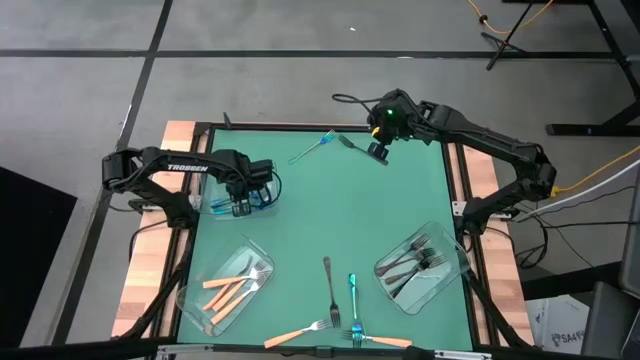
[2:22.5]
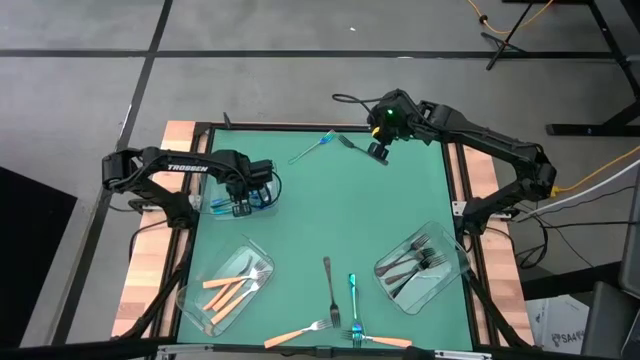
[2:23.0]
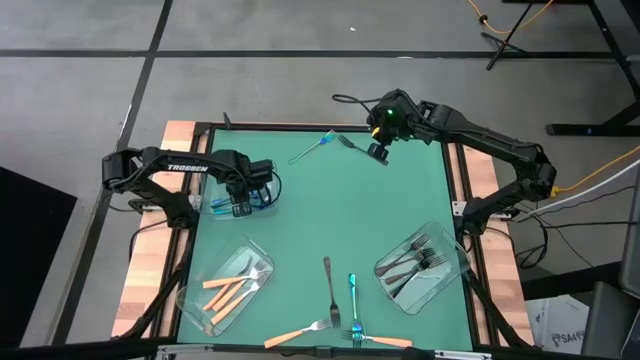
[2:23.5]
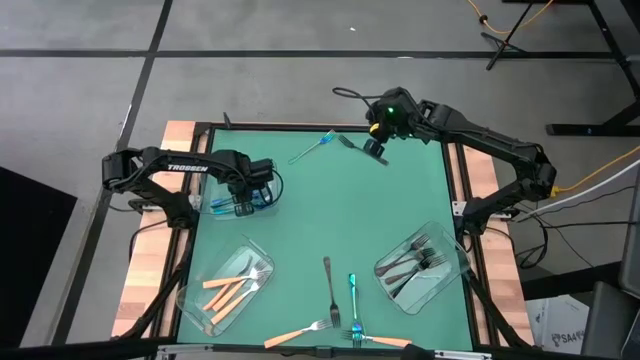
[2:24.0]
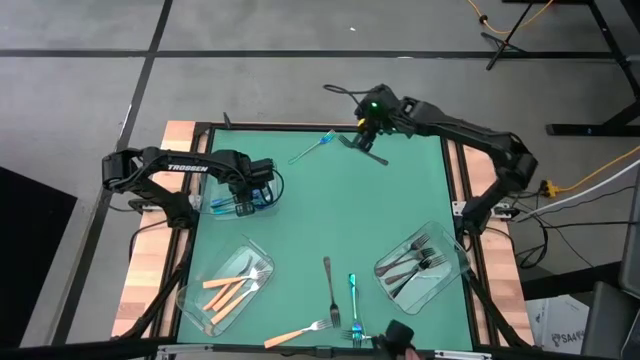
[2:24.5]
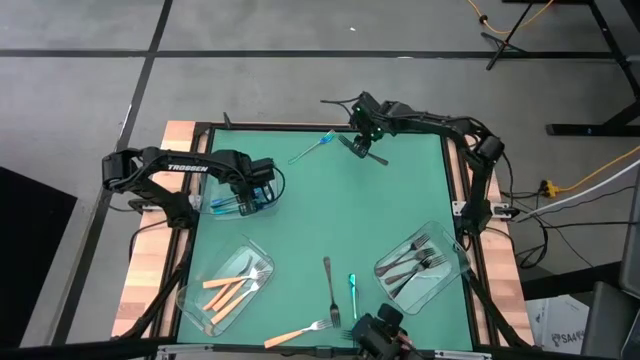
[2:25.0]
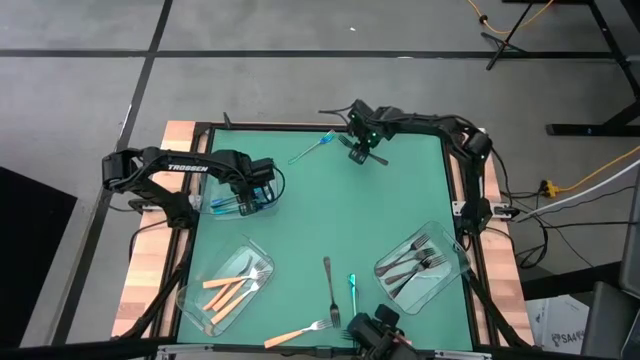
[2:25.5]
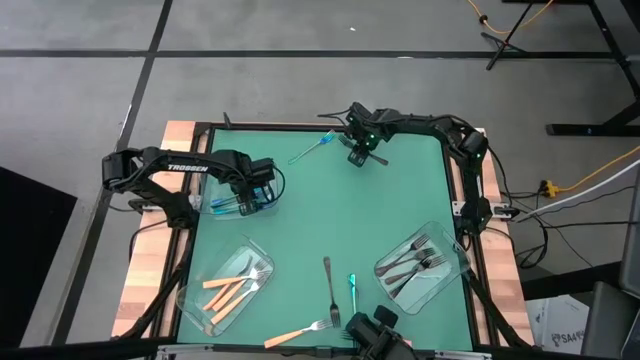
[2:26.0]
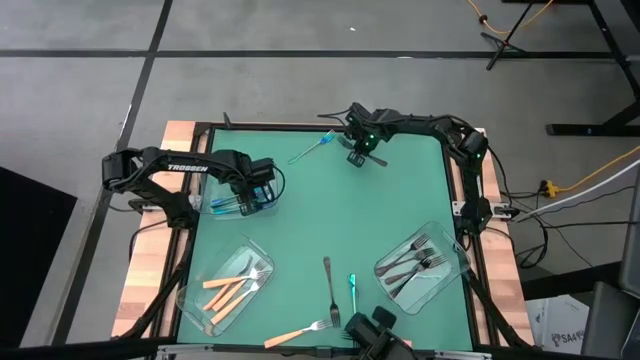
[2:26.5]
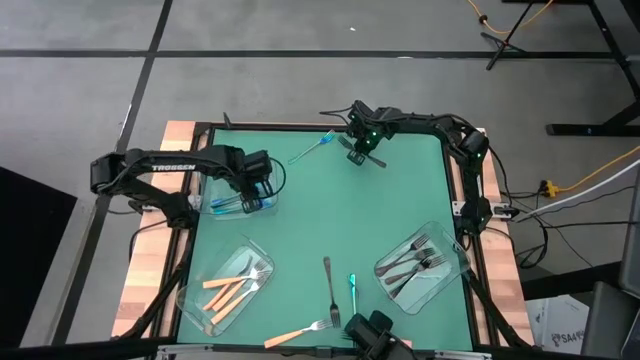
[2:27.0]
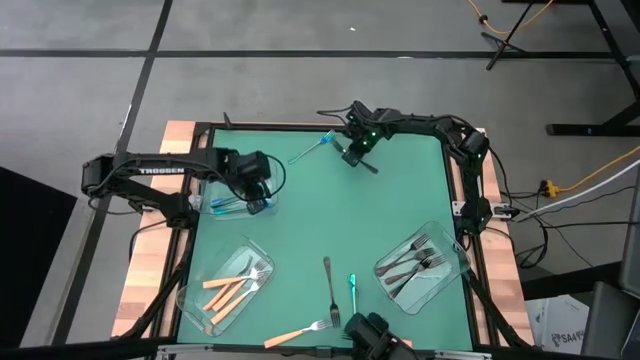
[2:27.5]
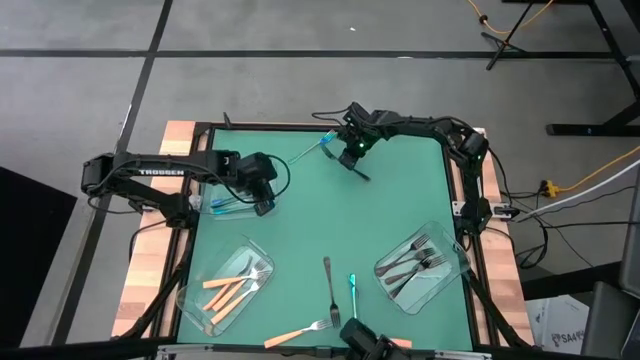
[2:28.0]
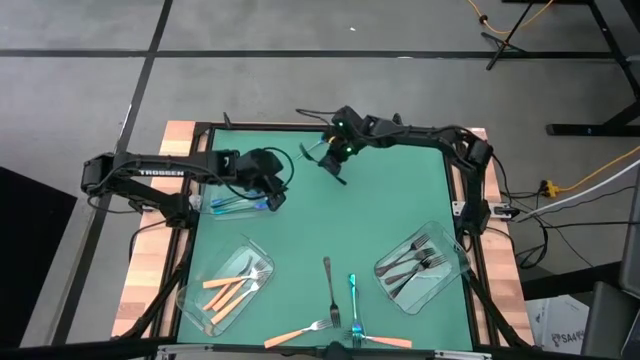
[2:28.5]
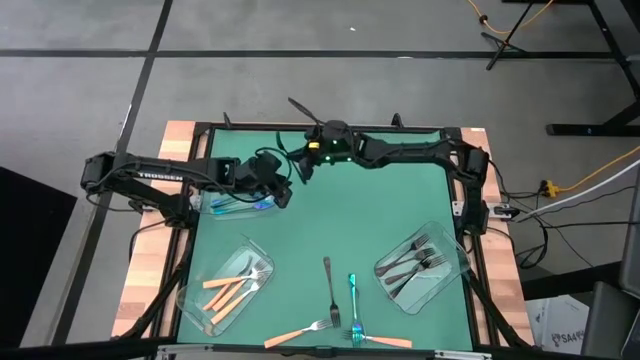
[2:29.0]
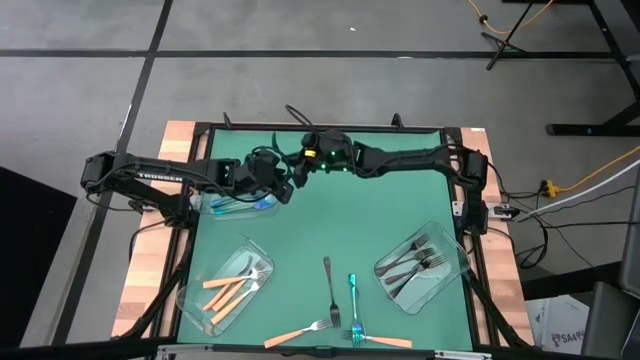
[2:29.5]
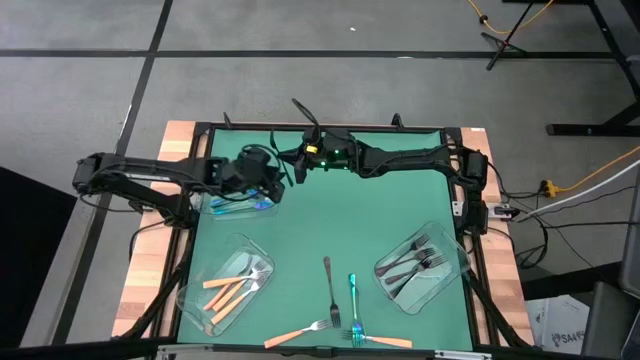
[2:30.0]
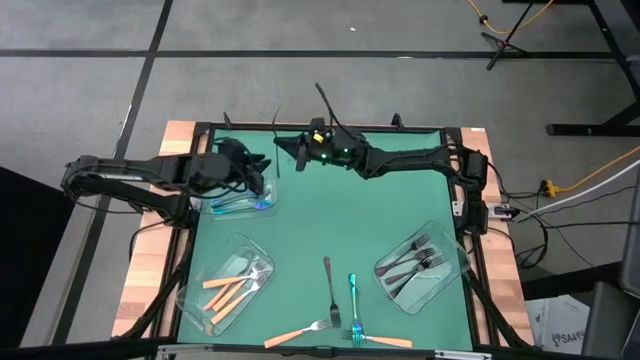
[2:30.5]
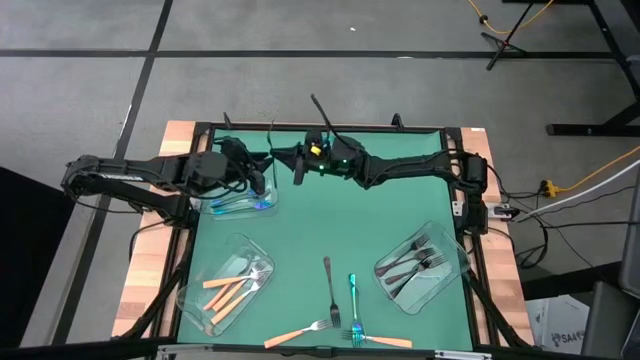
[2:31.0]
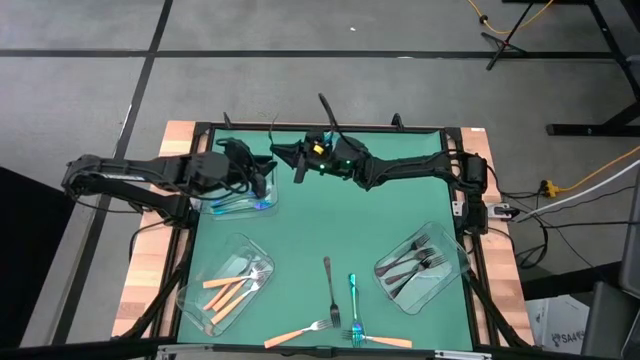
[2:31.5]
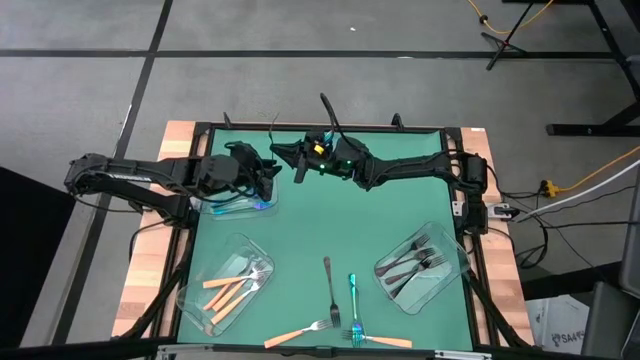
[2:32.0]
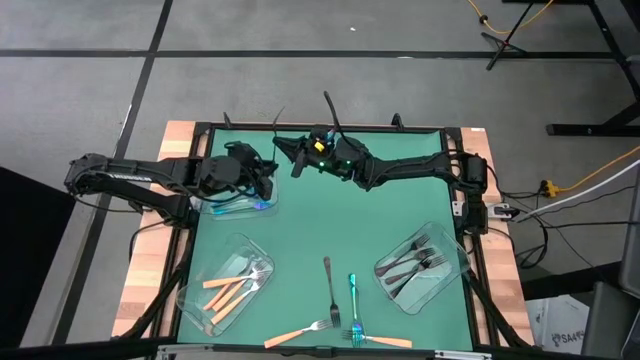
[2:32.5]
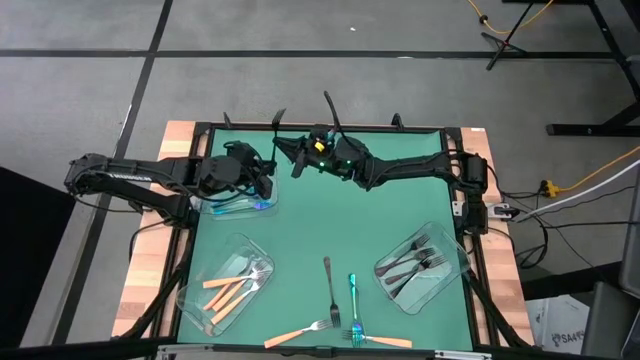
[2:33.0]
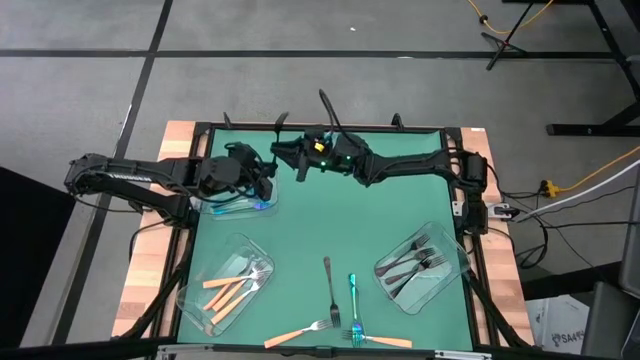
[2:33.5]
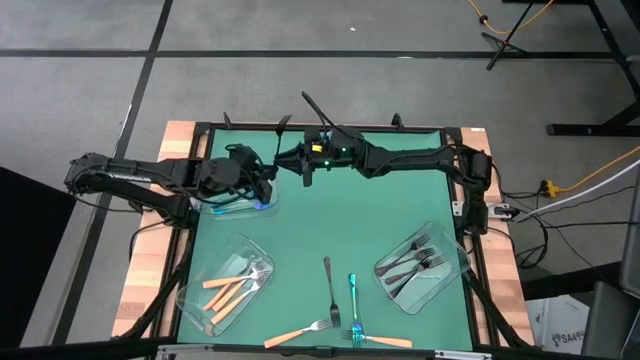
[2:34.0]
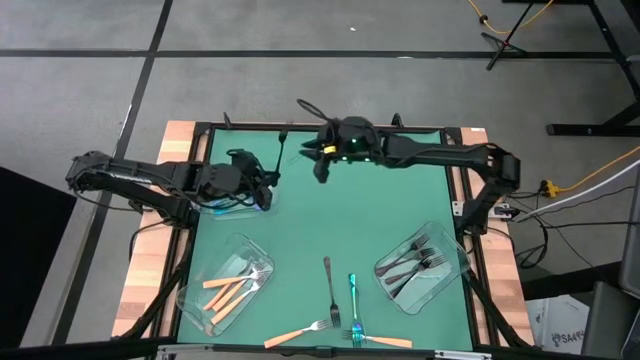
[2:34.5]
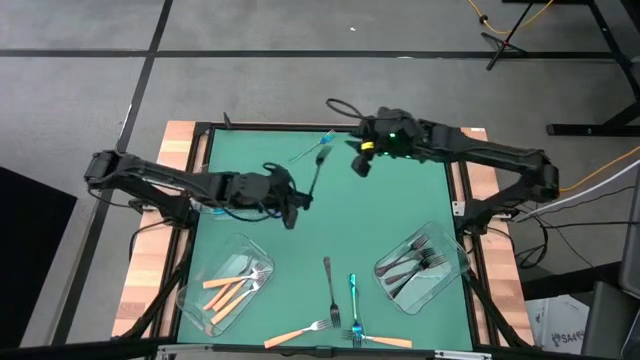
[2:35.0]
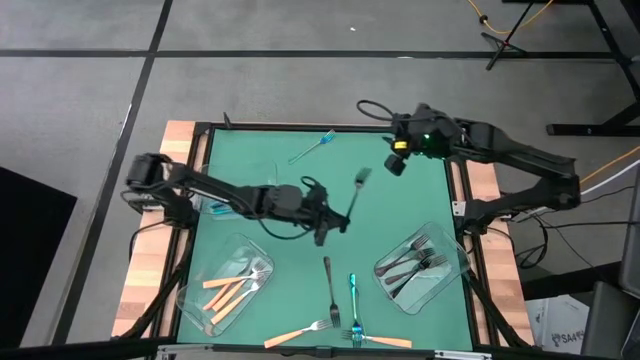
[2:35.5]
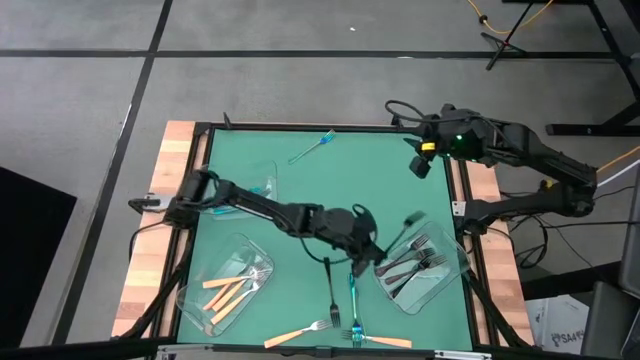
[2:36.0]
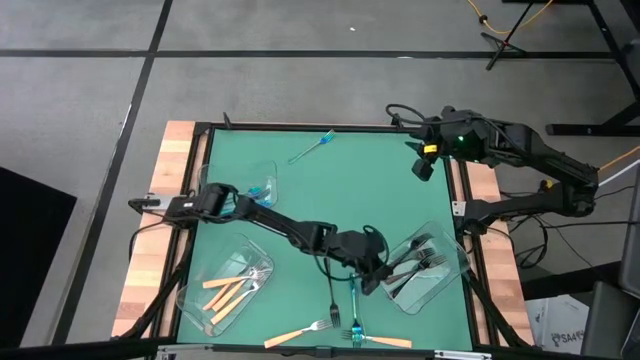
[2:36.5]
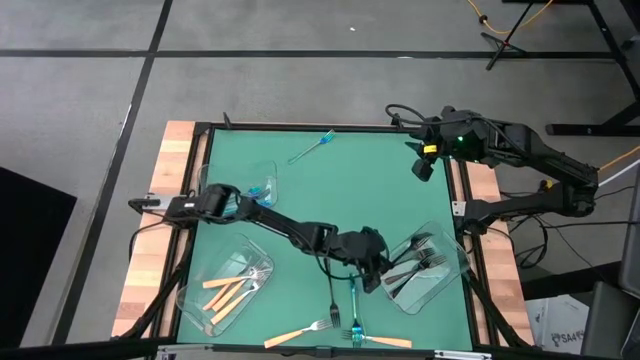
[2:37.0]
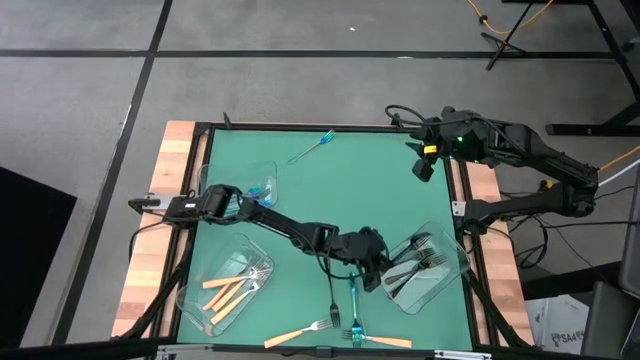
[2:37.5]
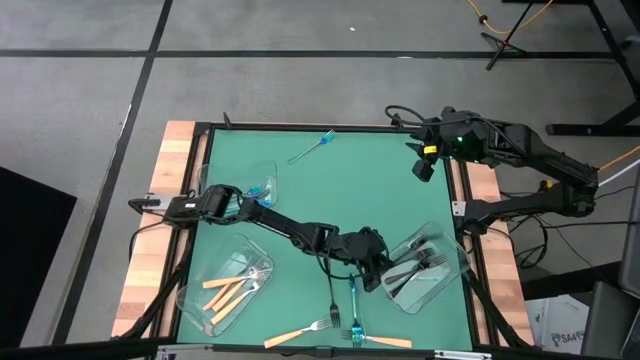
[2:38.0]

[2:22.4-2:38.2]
Task: Sort silverware by color (type)
Put the top black fork into the bottom right transparent bin

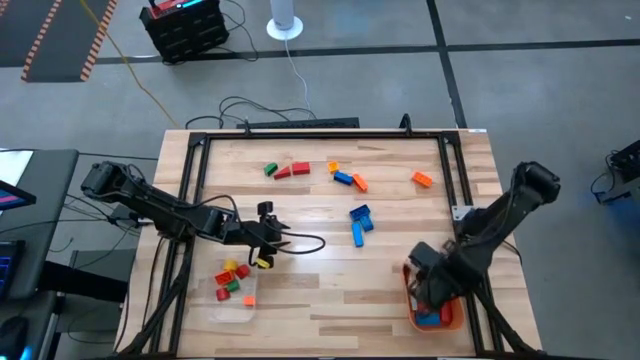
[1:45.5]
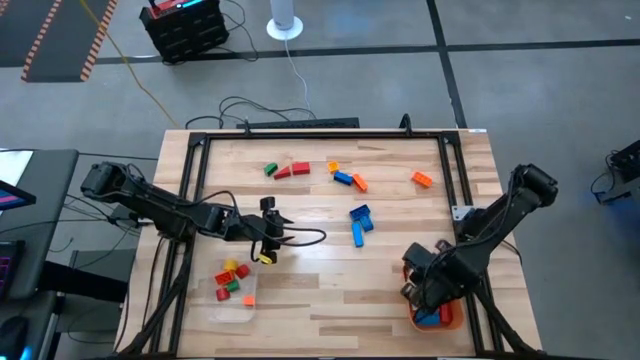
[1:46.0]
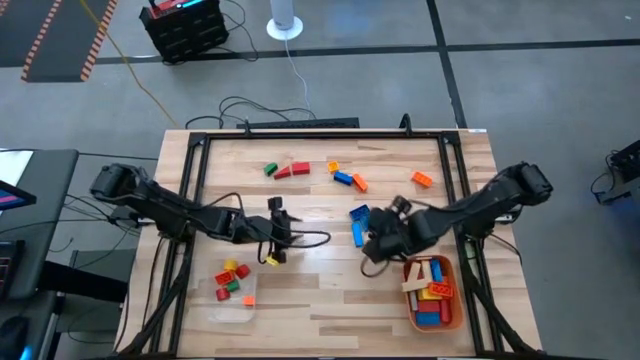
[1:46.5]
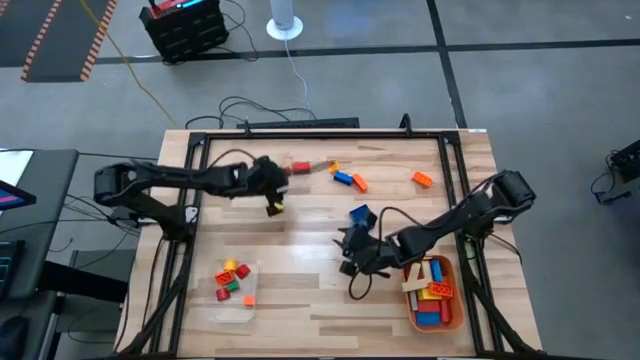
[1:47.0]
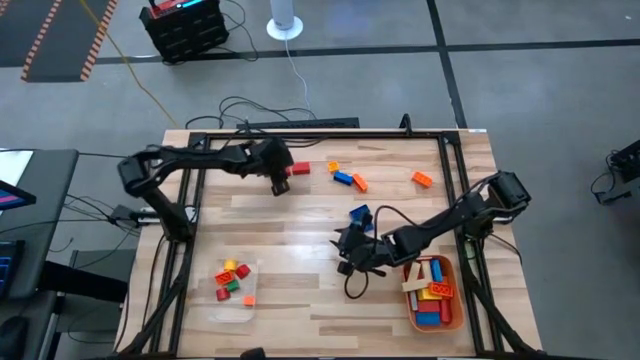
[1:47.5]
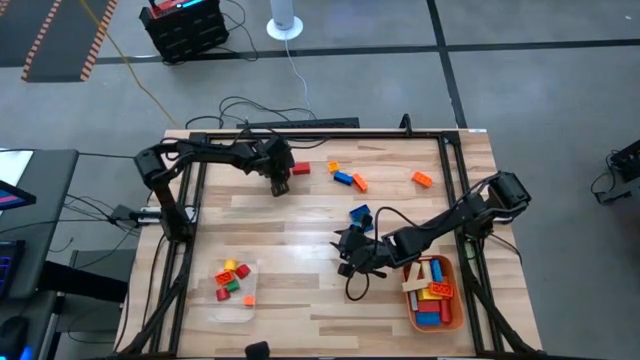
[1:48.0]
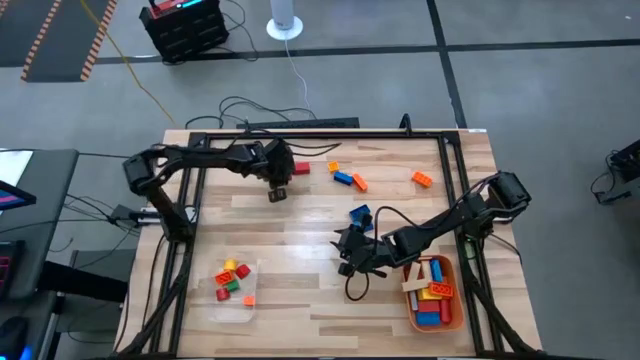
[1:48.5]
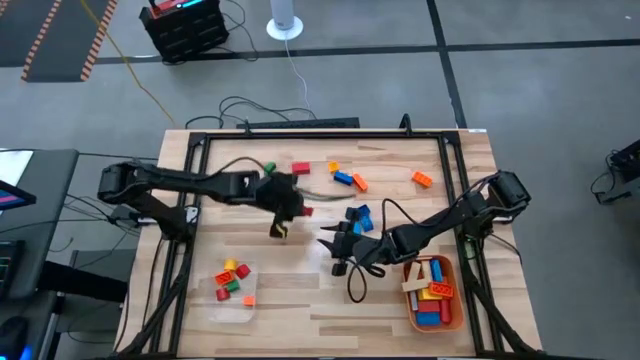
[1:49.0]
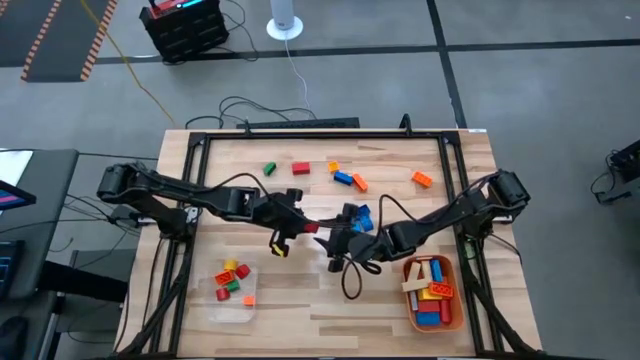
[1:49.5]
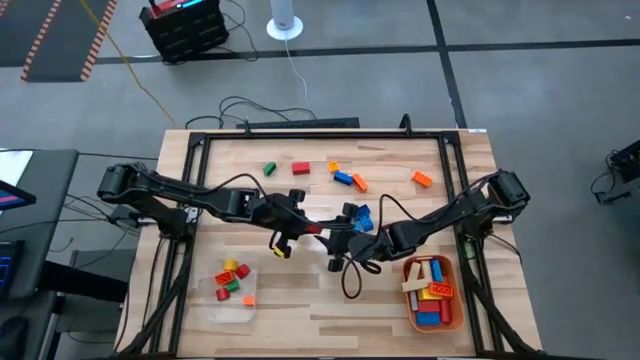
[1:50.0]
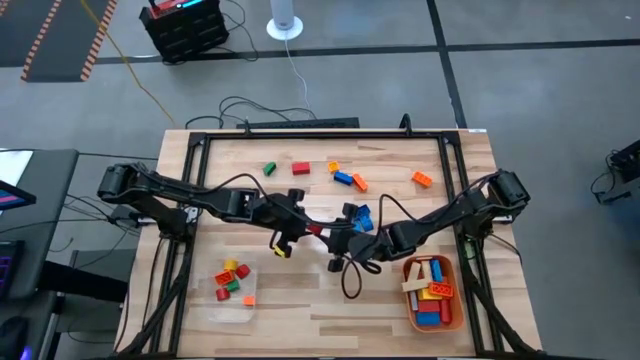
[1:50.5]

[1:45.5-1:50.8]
Task: Sort blocks by size
Put the large red block into the orange bin
